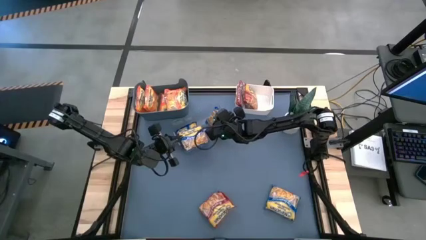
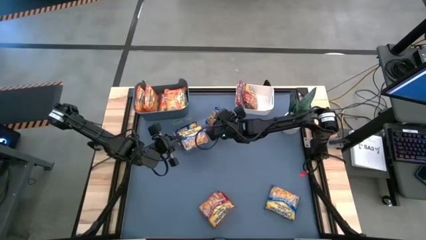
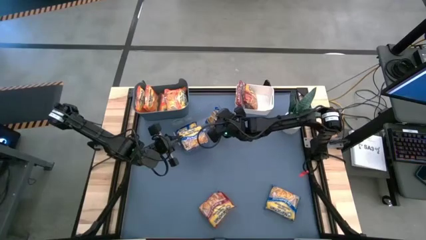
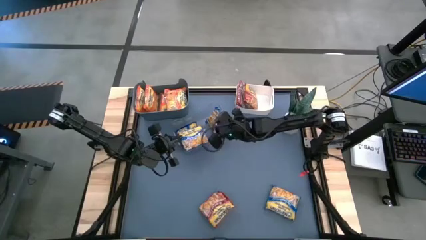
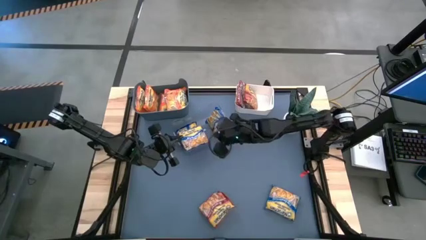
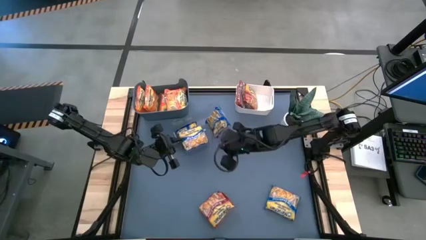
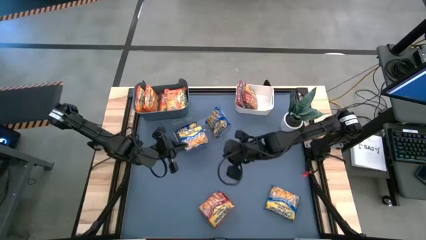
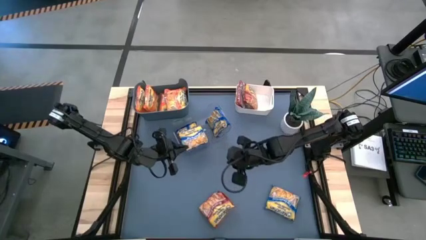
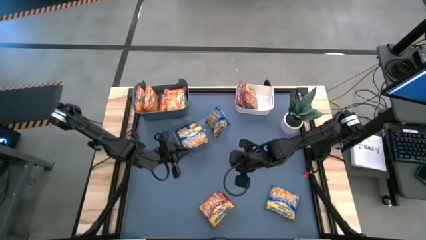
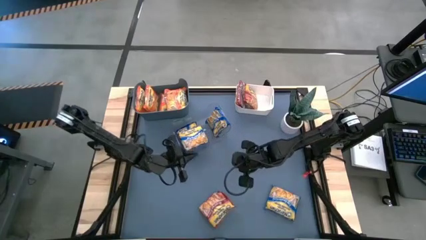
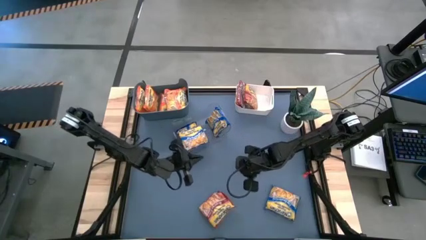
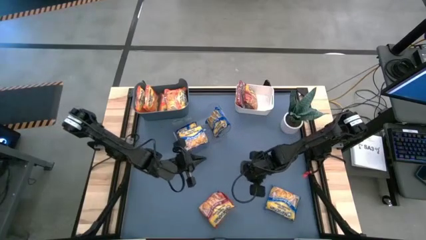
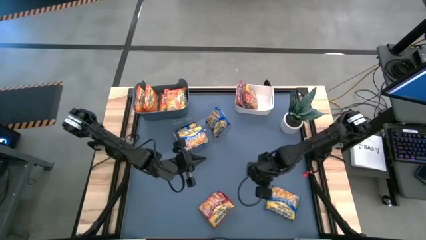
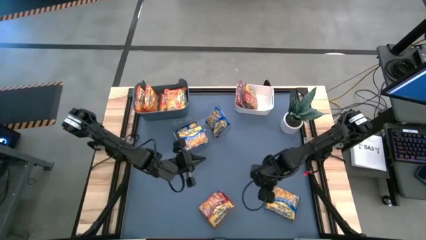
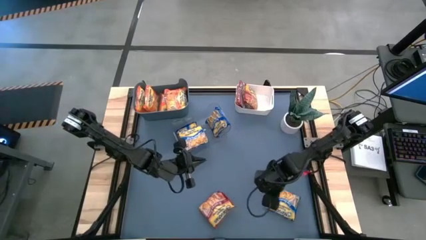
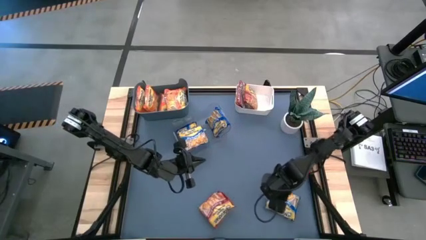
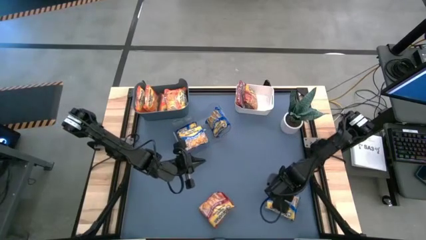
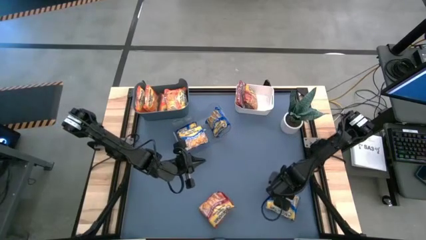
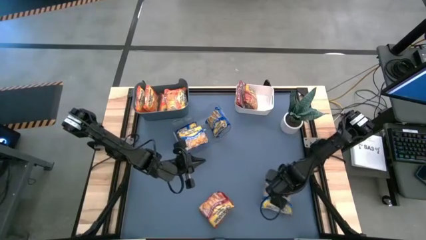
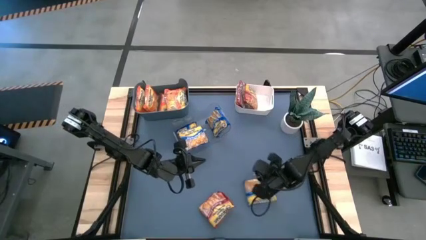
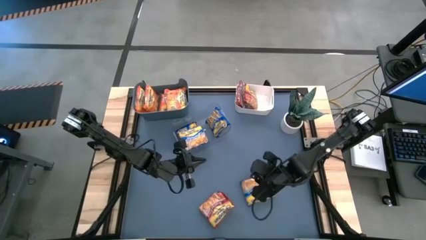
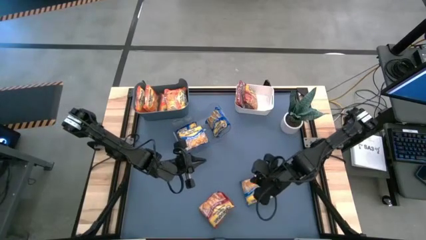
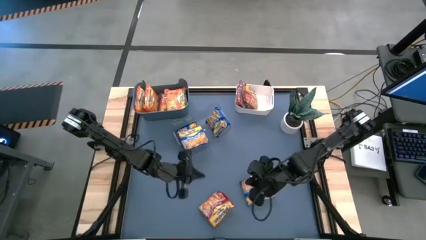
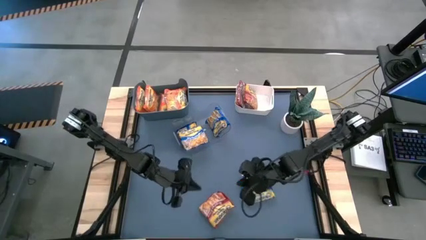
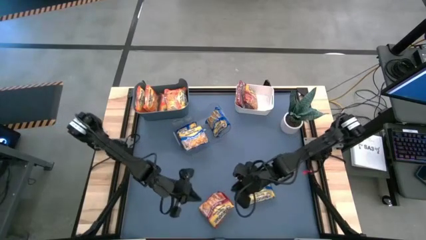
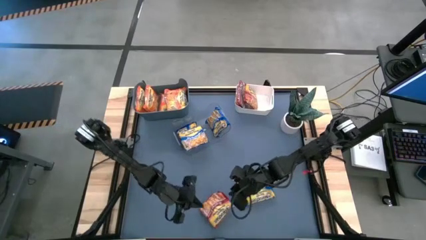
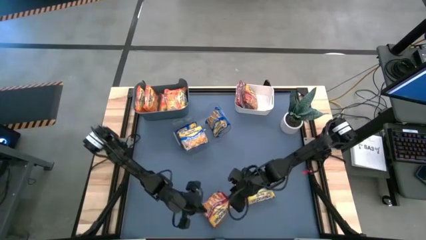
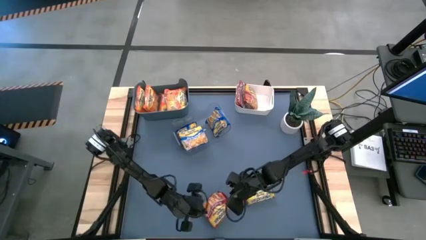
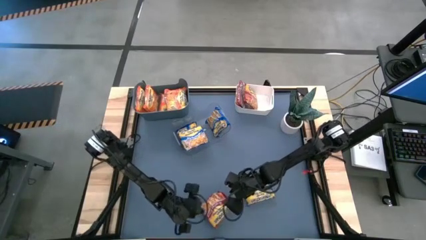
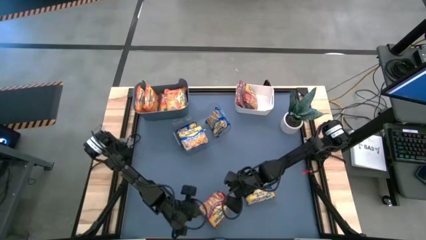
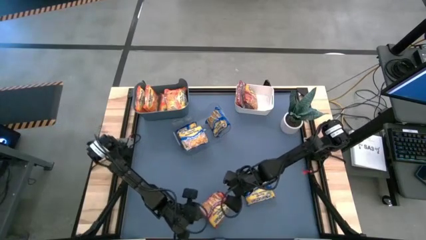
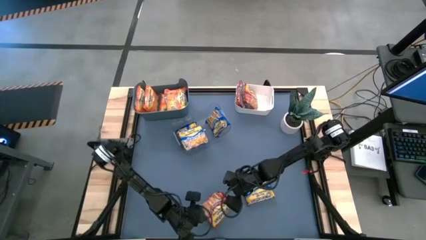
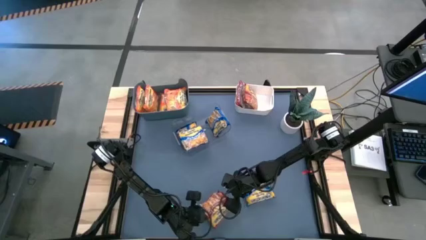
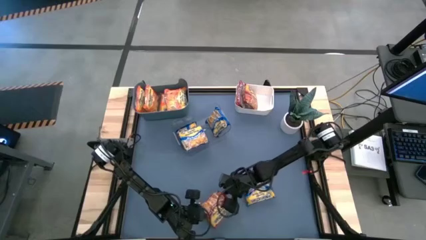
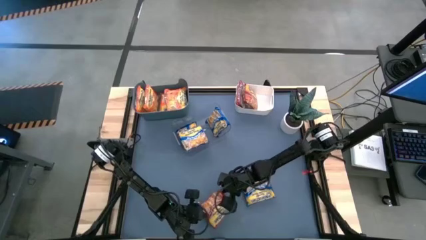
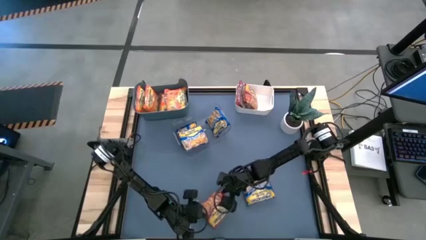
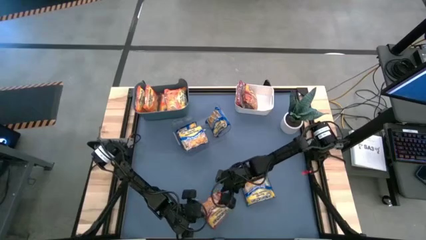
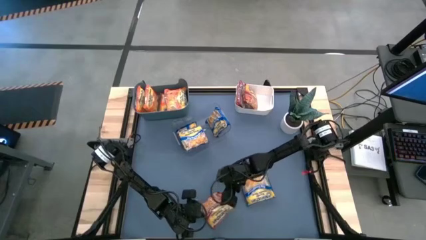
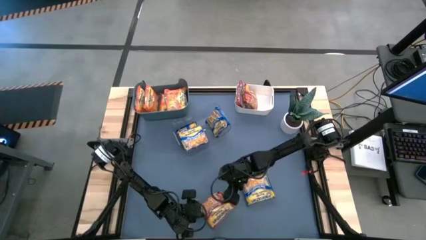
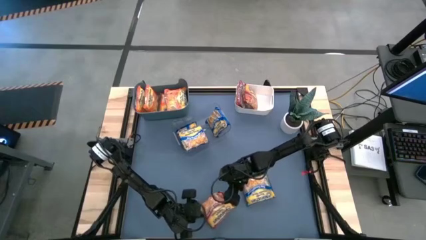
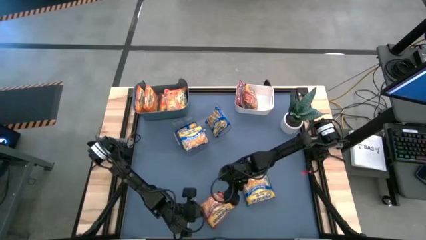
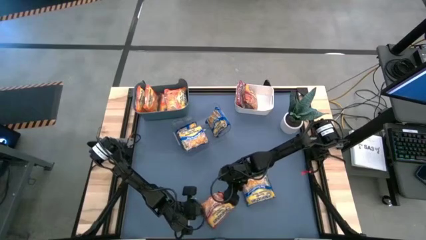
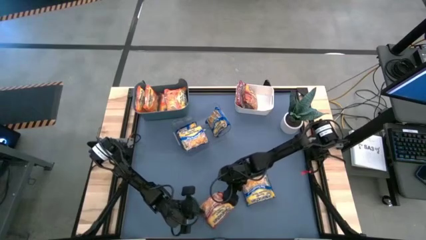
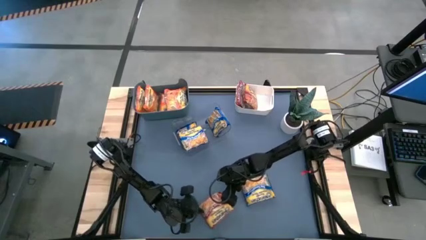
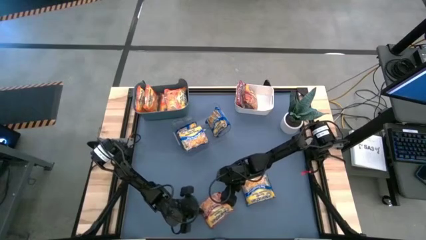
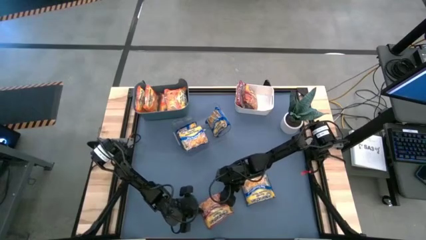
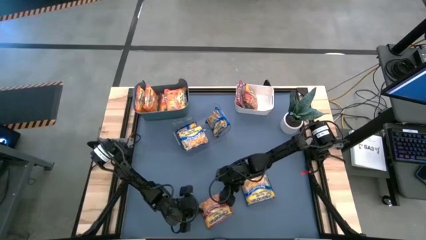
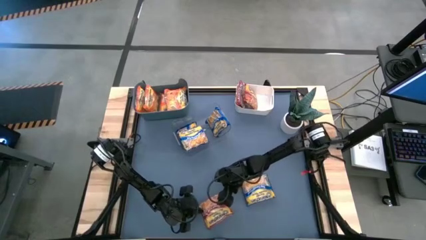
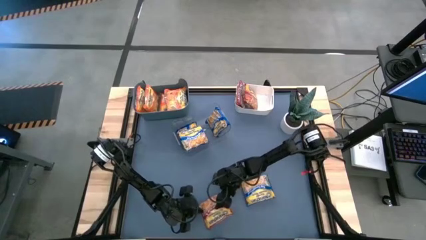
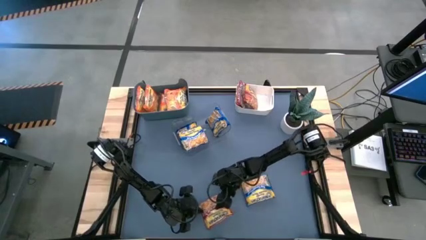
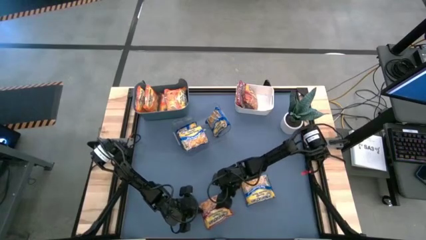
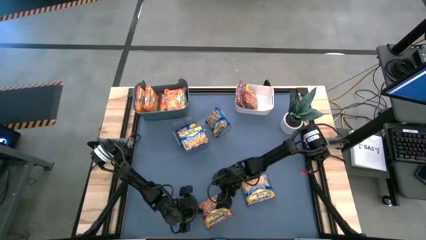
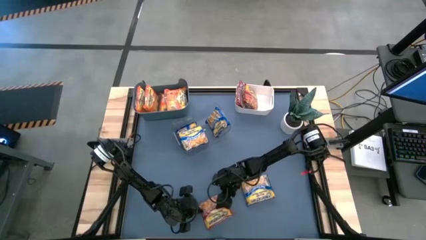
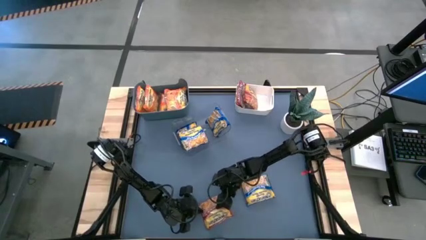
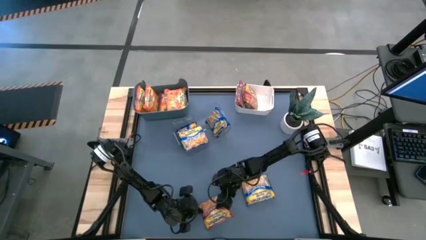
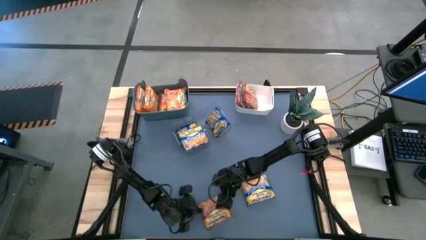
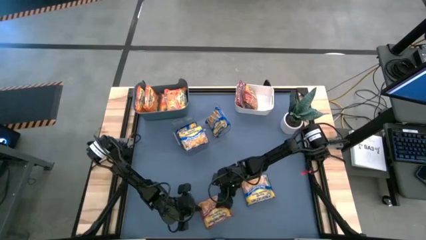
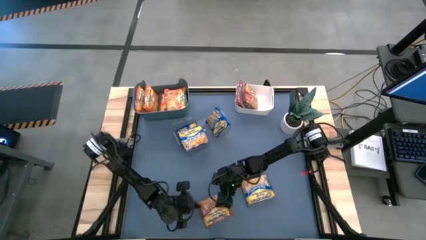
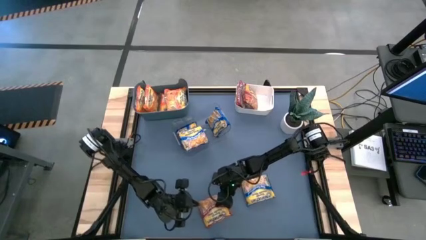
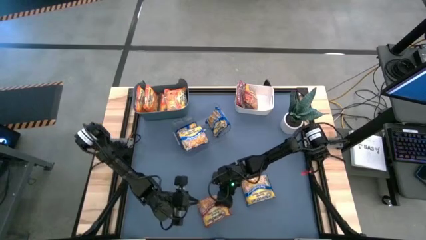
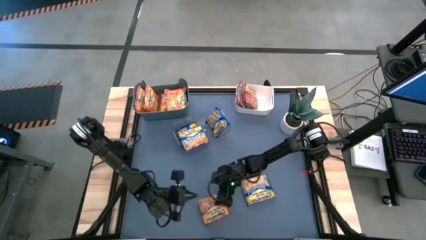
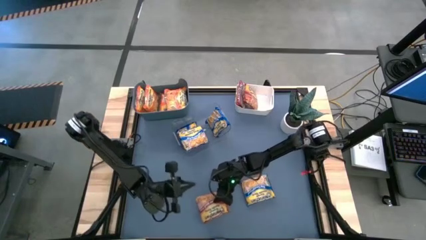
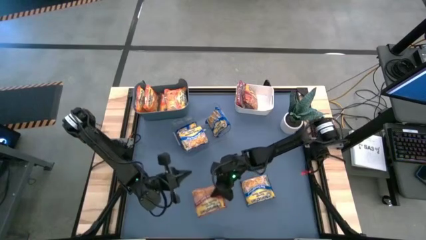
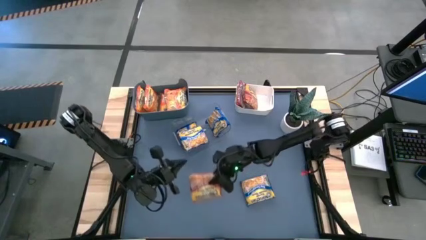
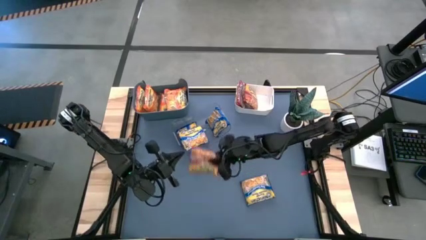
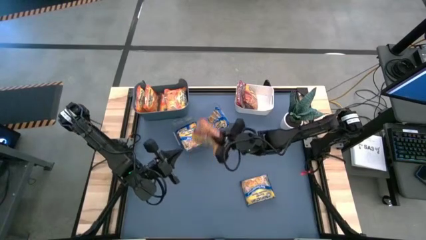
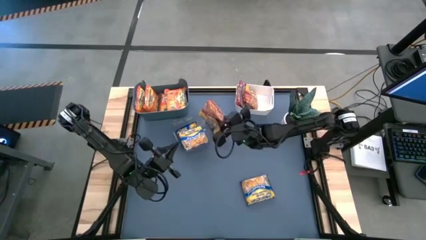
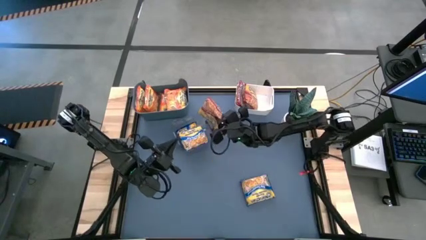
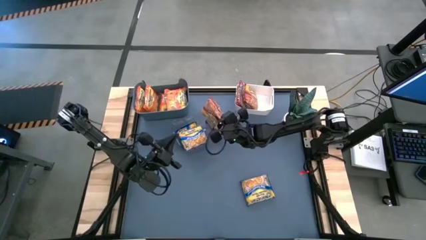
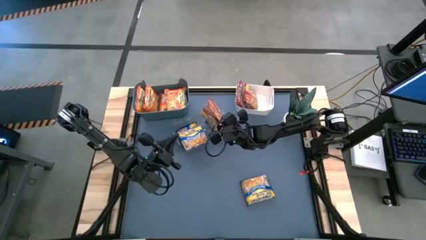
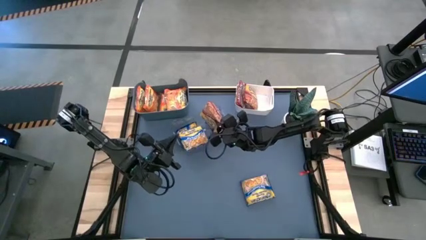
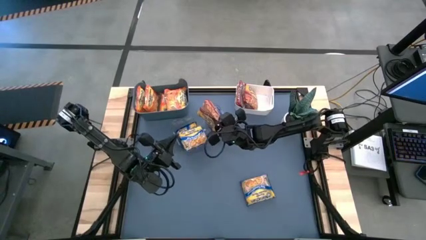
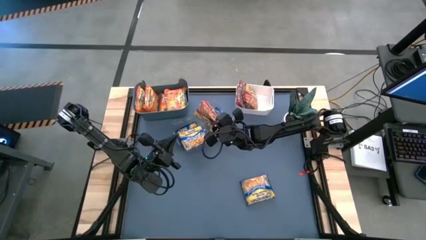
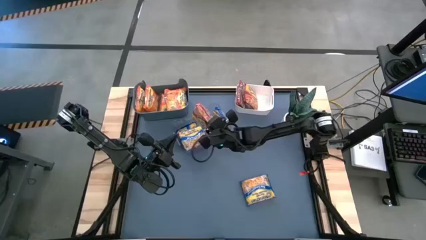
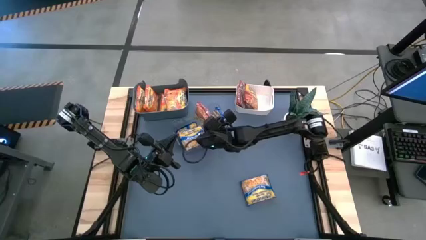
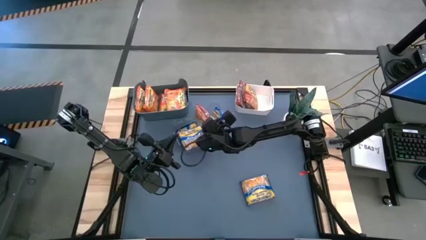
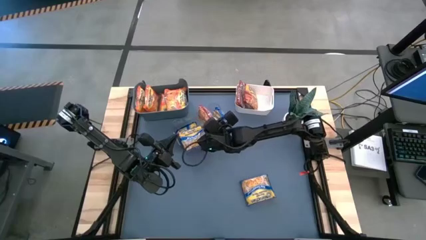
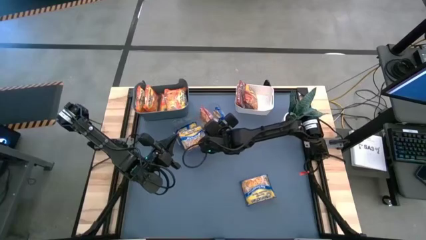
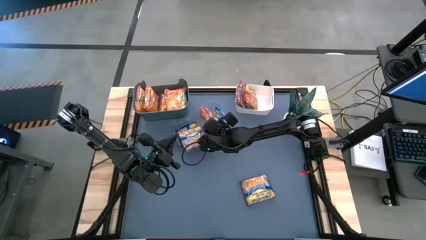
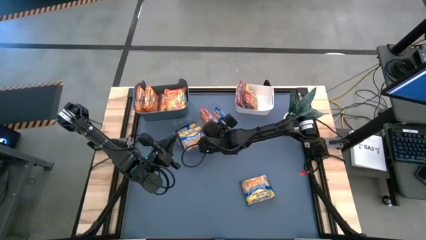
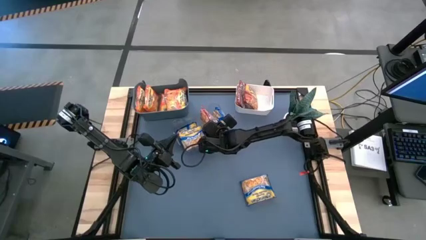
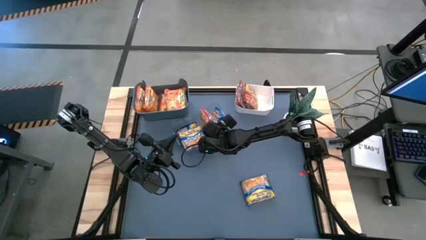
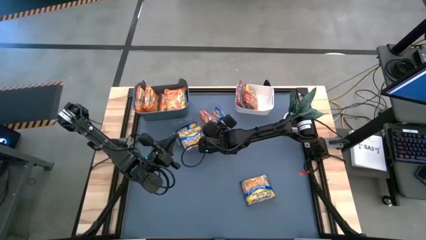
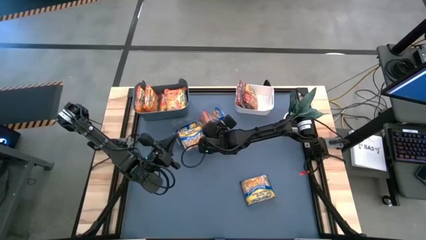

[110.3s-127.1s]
Task: Sort Maruchan noodles
Put the red noodle pack into the white bin
